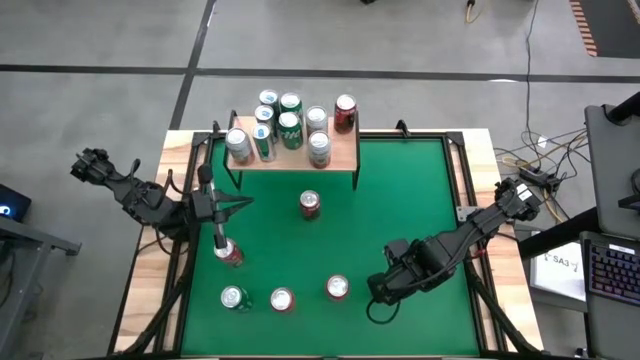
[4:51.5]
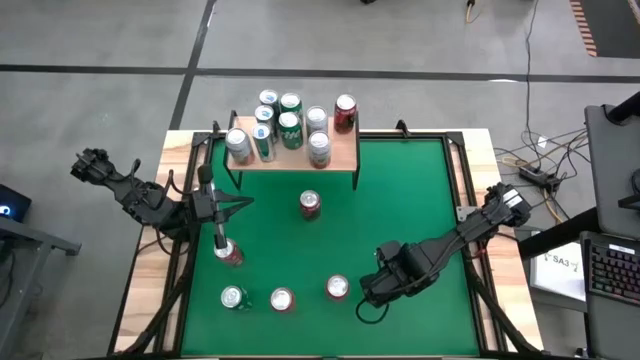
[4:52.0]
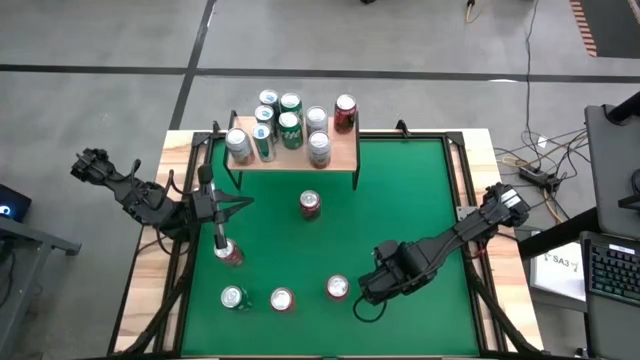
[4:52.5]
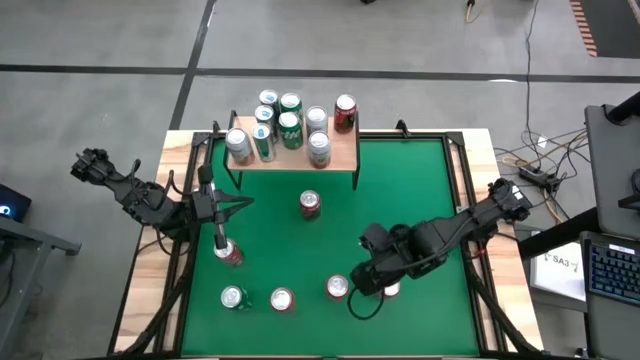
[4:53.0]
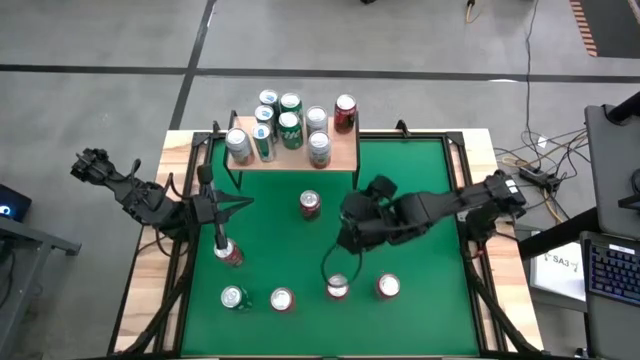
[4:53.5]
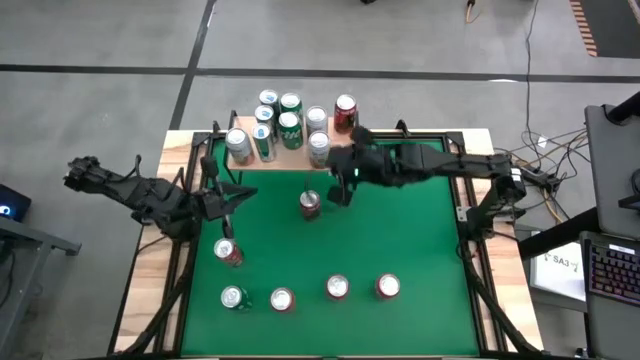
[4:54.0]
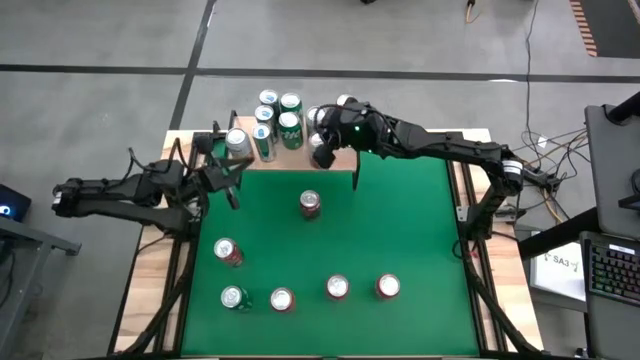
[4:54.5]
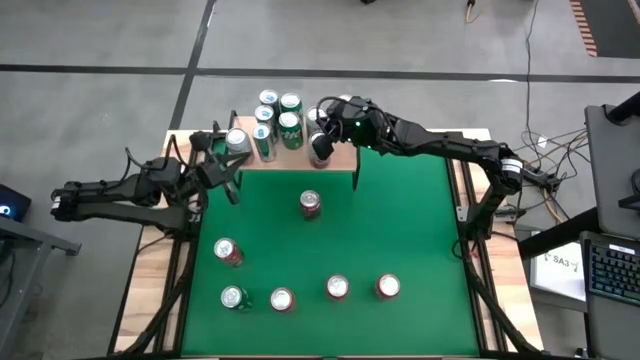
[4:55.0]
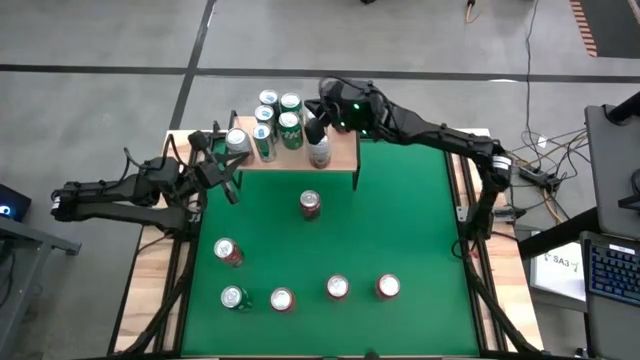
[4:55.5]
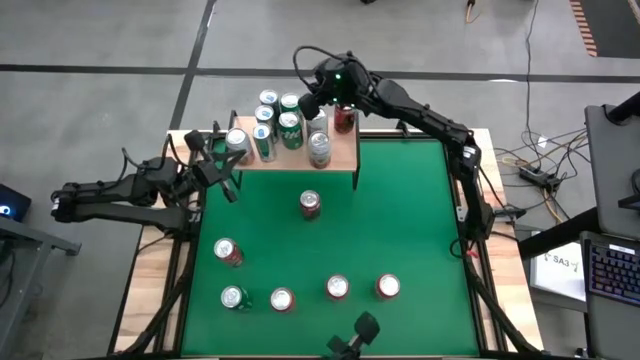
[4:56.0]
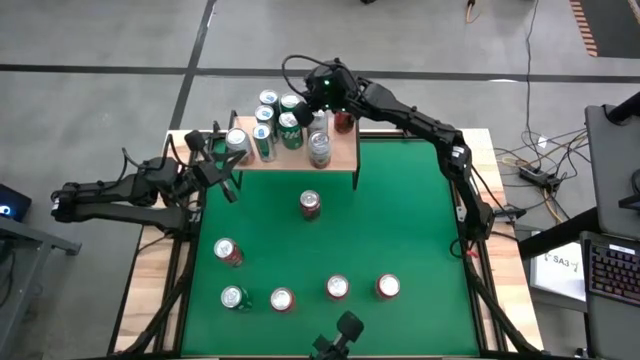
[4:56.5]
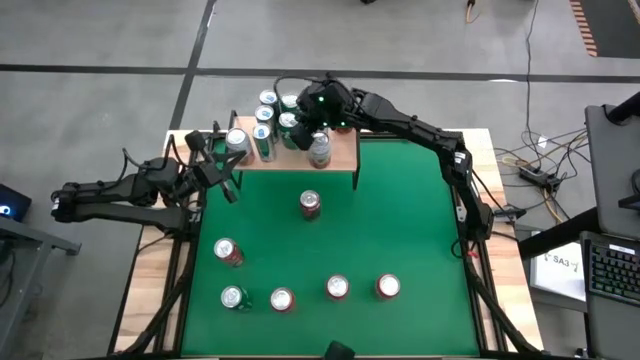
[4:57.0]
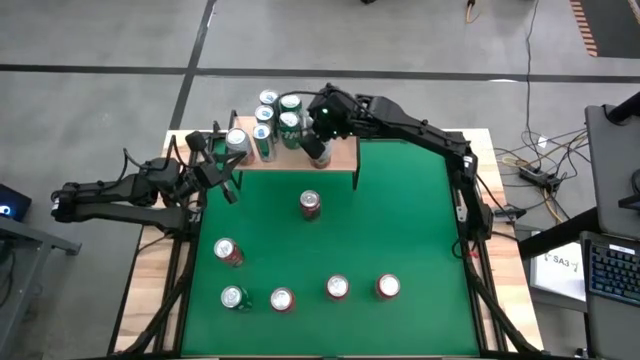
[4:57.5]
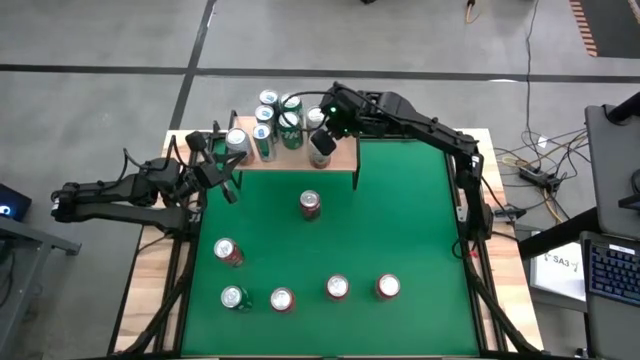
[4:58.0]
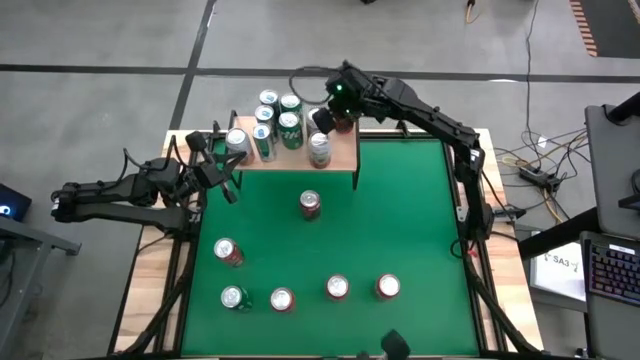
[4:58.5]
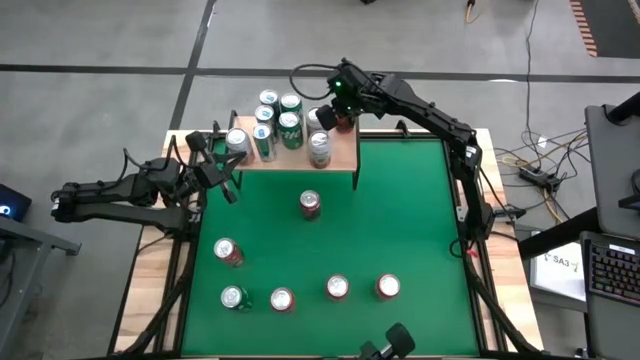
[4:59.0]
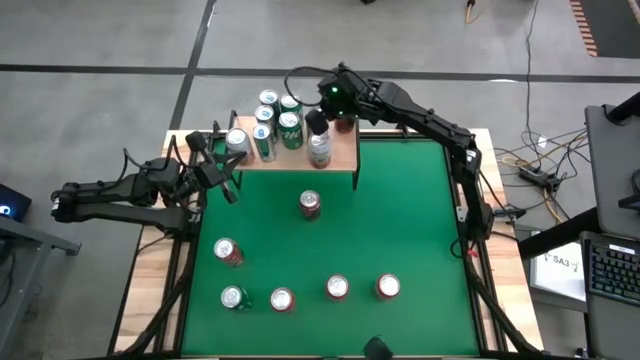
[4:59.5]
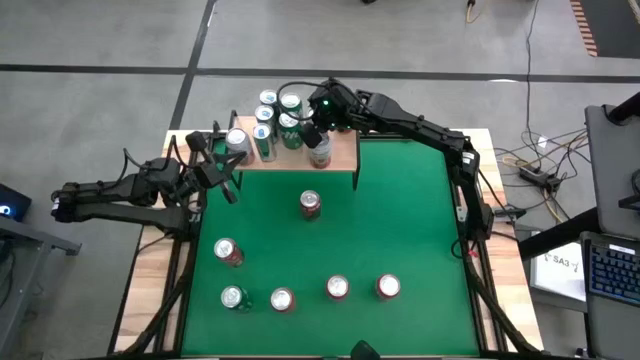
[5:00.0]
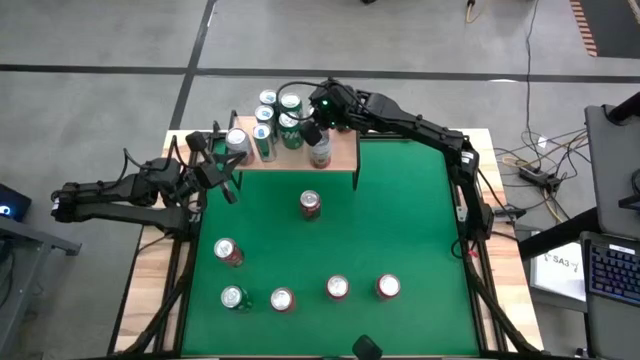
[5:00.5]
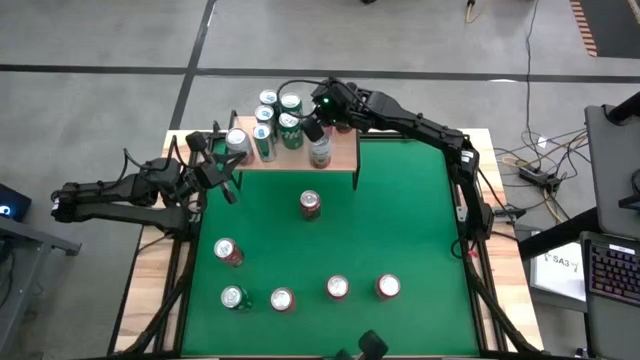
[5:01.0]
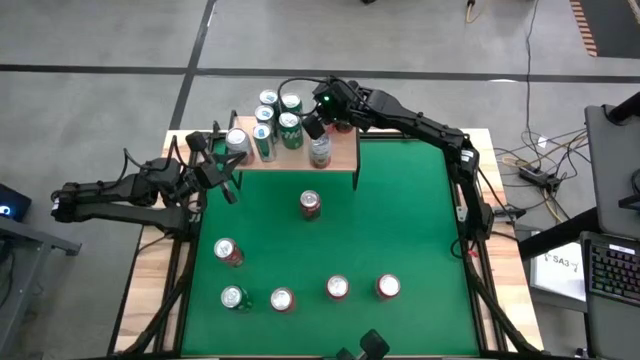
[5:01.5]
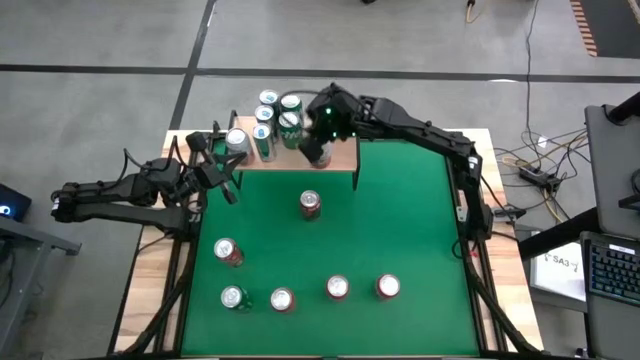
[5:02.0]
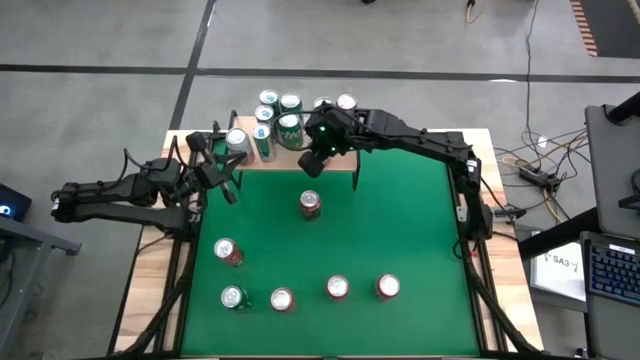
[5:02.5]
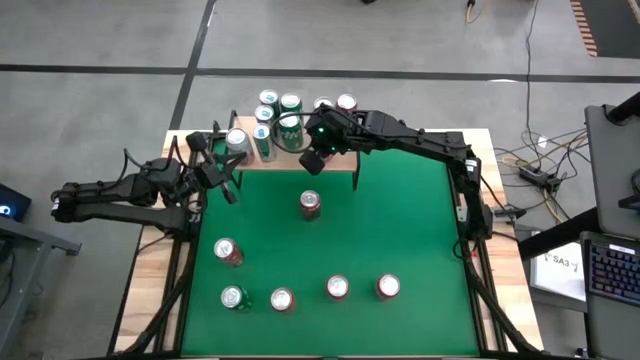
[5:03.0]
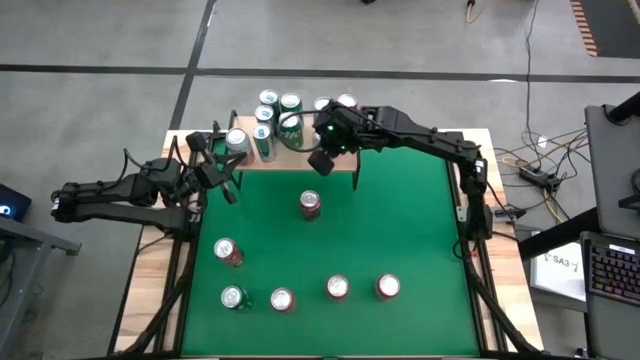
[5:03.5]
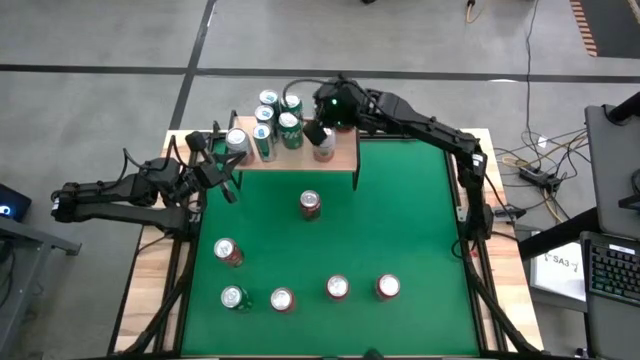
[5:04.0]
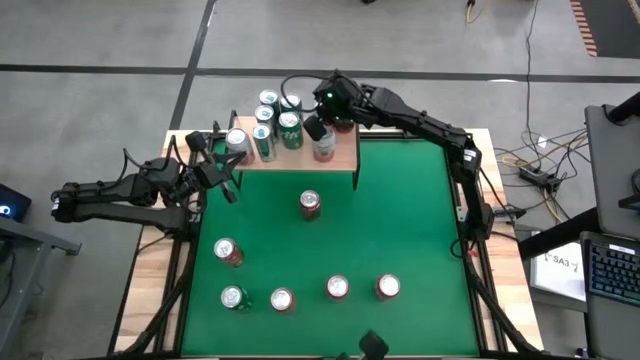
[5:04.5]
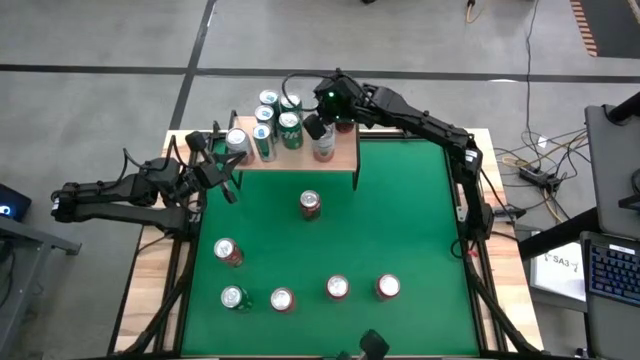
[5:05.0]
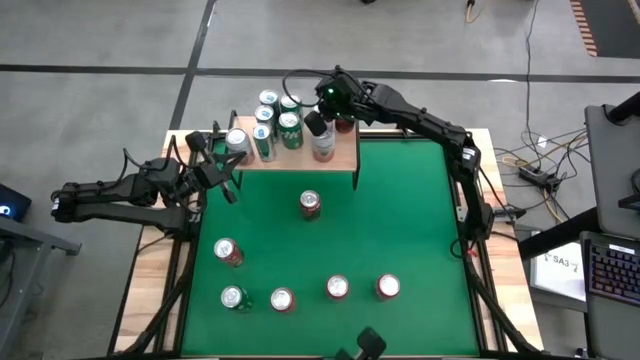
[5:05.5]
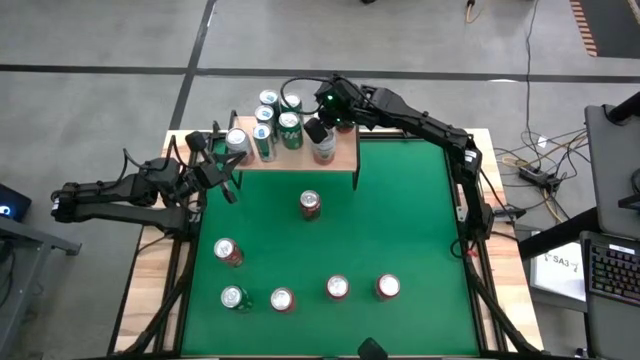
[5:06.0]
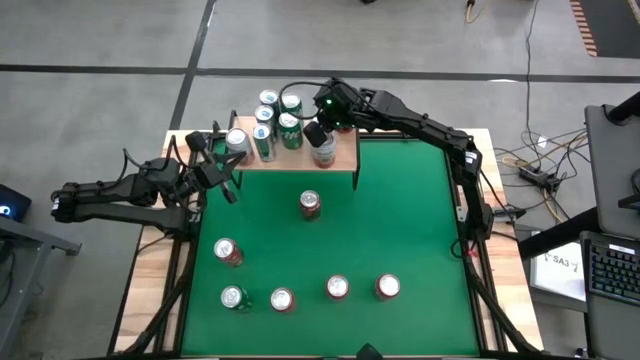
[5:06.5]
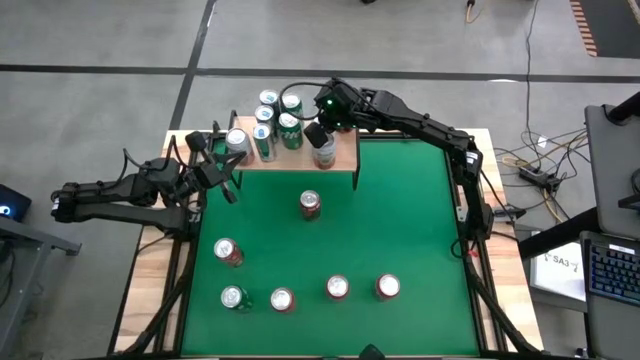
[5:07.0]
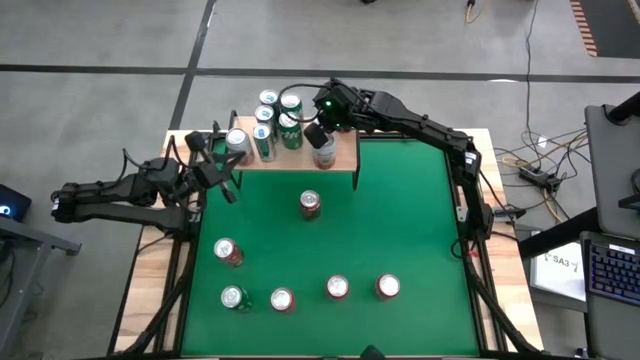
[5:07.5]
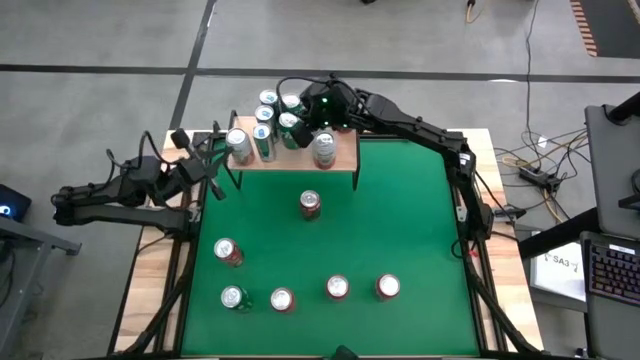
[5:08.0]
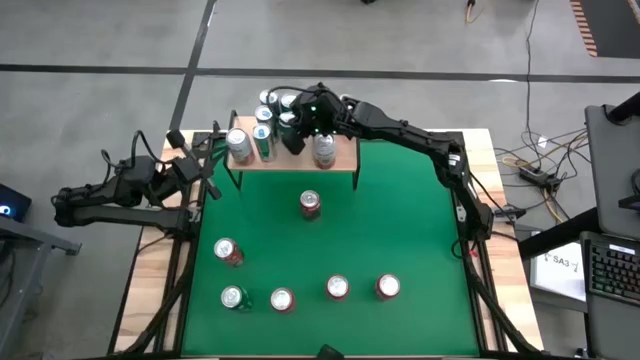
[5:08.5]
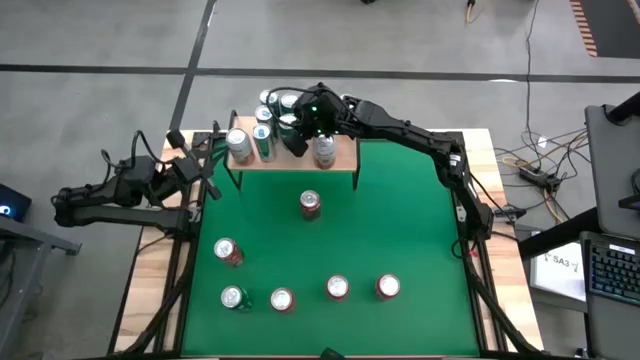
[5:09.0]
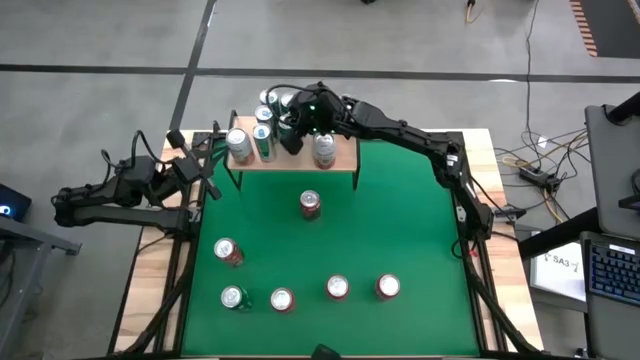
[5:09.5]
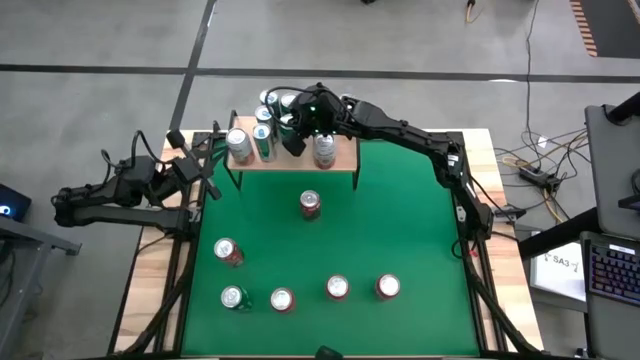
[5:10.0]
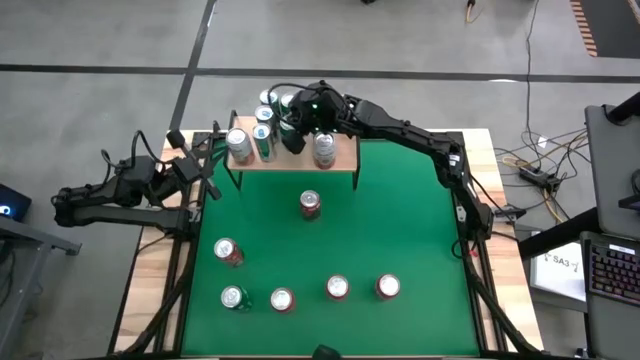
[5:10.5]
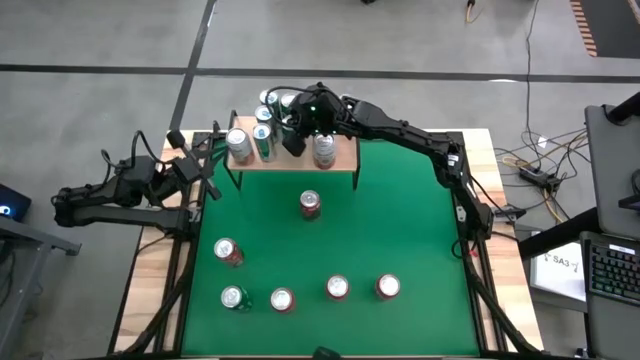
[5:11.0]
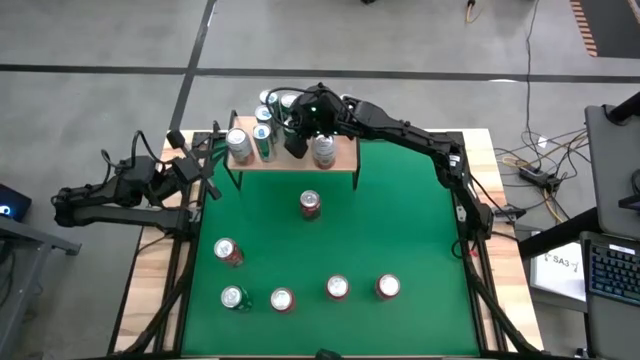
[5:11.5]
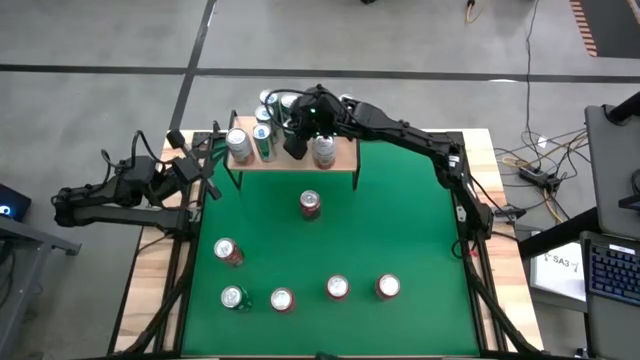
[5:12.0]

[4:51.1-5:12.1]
Task: Place canned beverage on shelf
Put the orange can on the shelf
